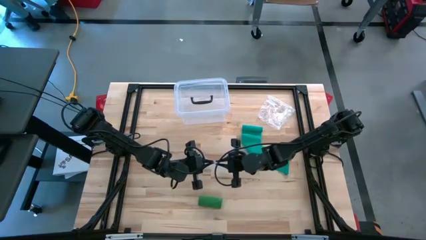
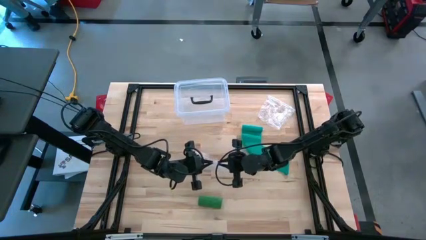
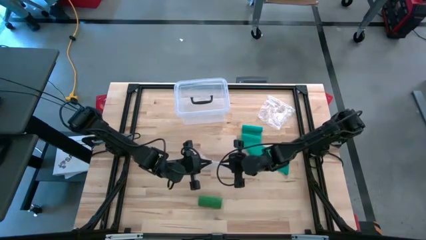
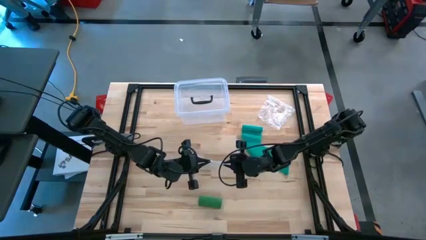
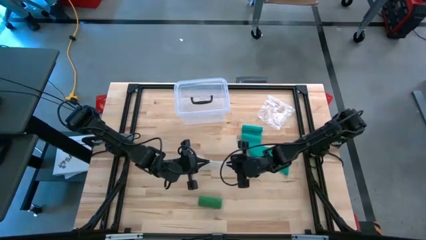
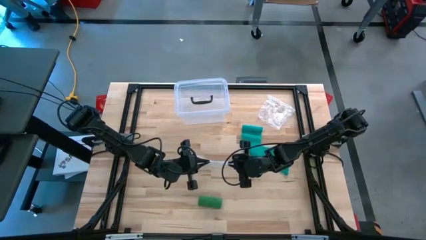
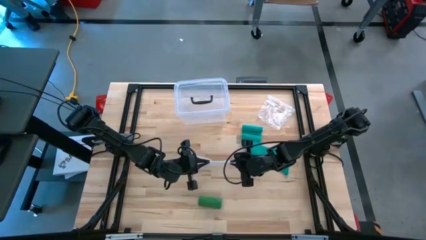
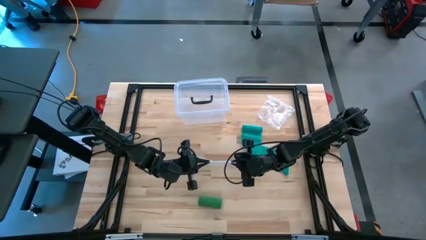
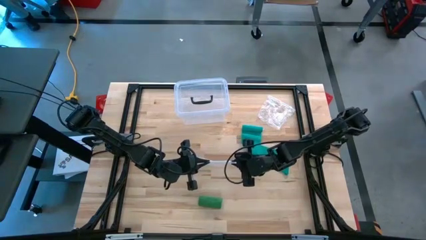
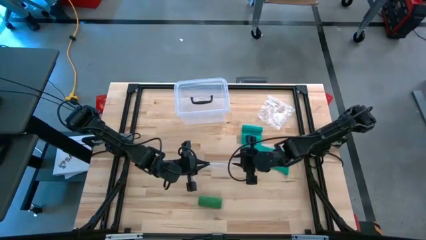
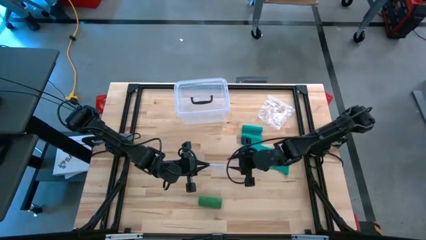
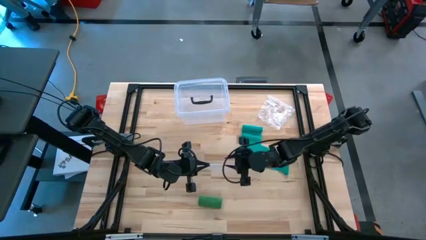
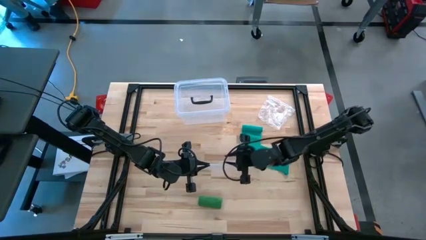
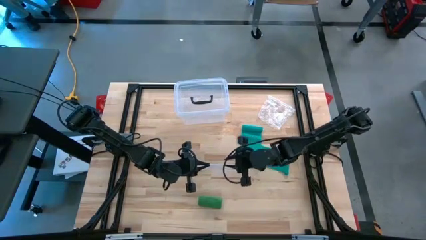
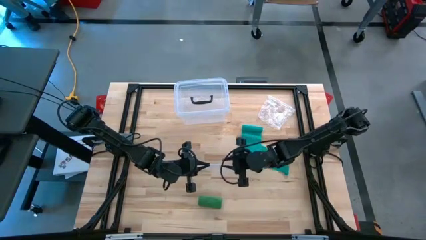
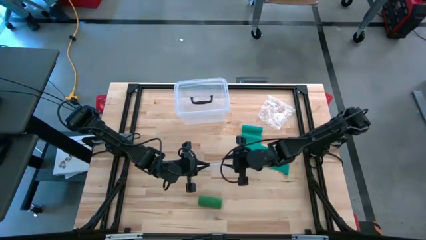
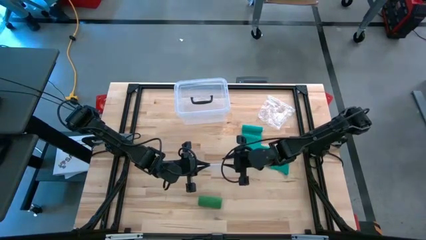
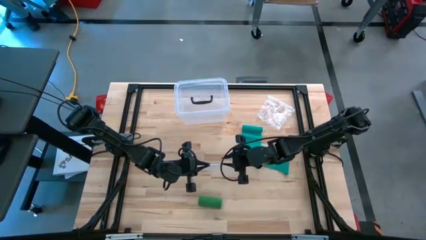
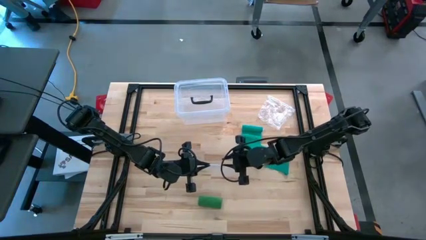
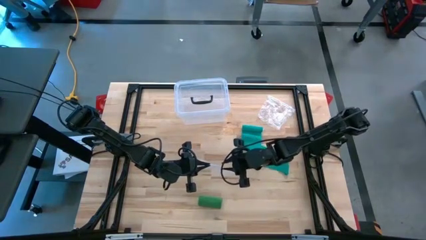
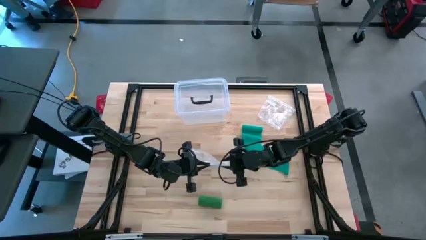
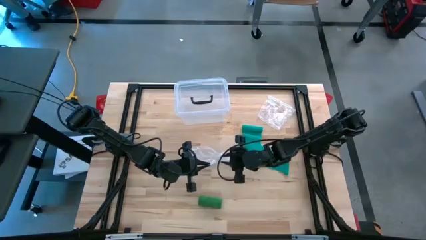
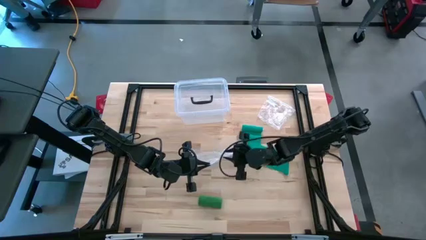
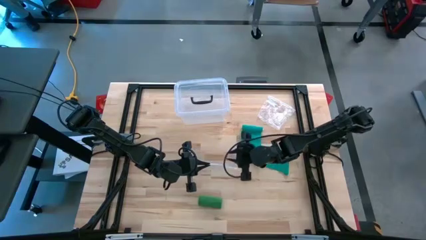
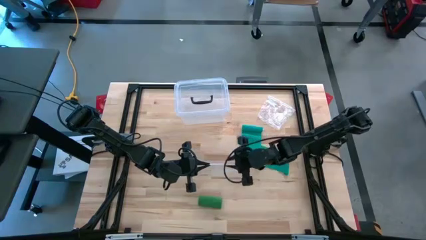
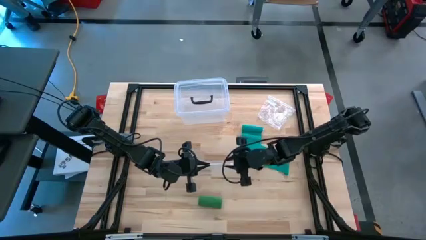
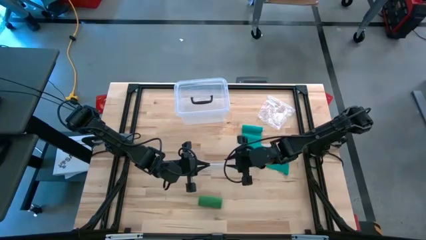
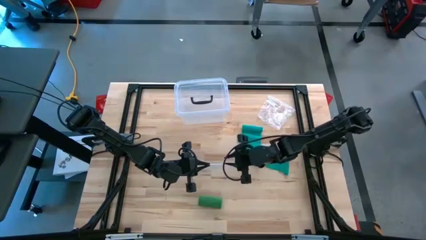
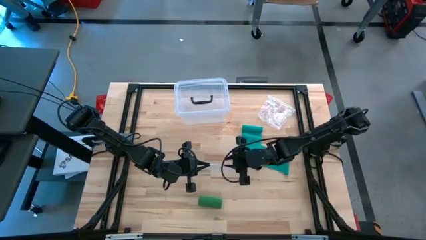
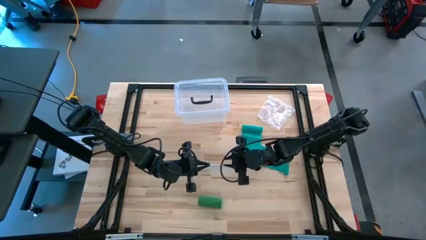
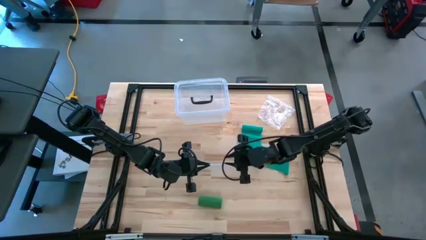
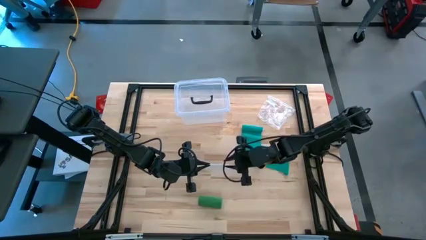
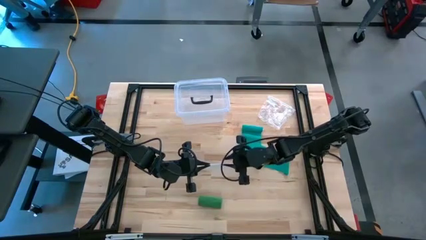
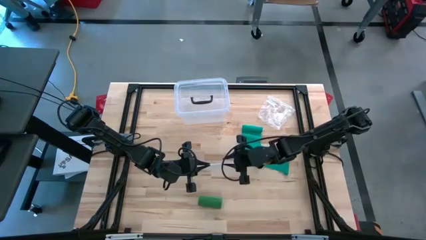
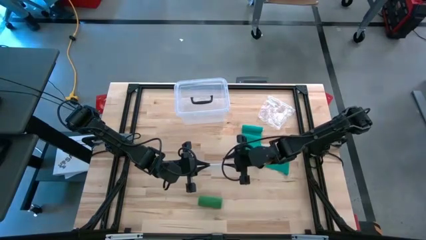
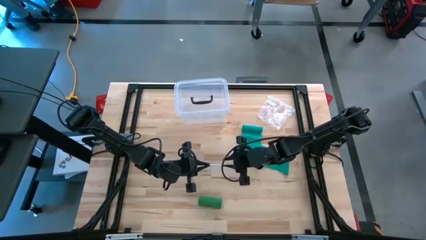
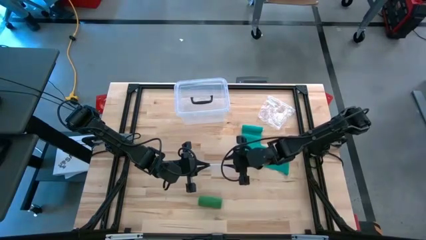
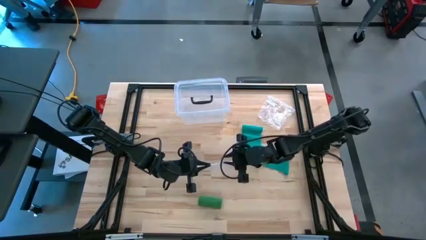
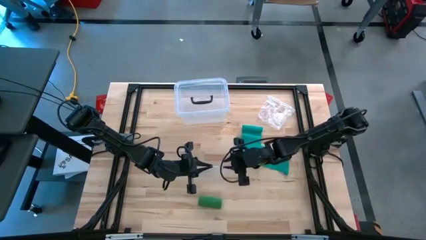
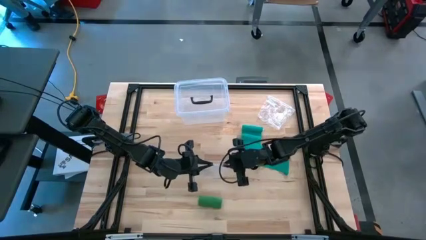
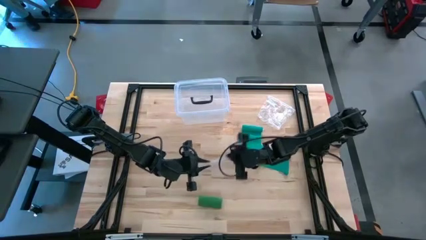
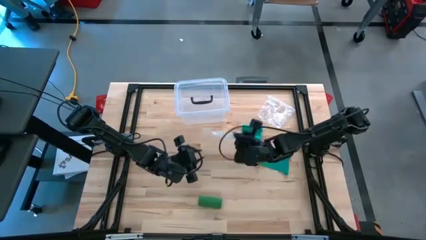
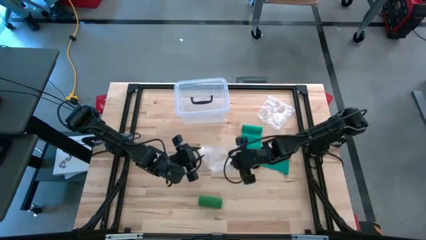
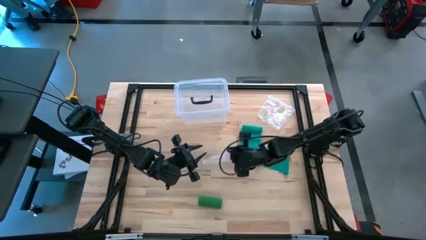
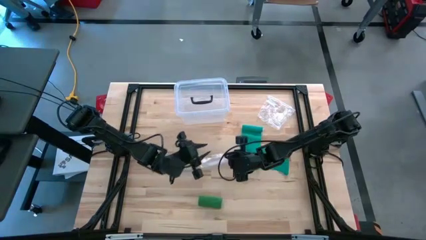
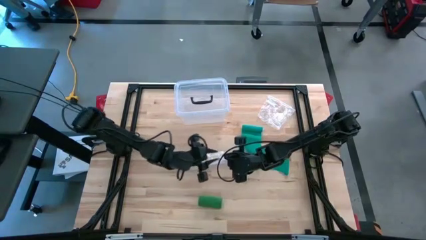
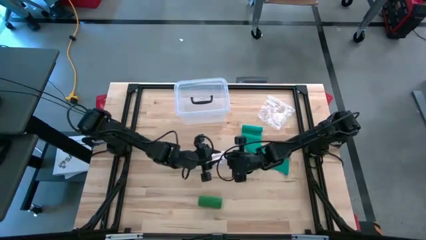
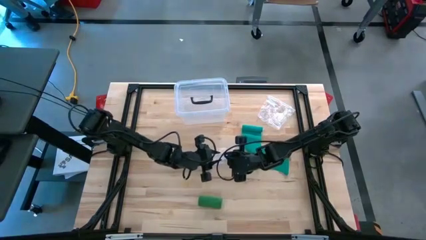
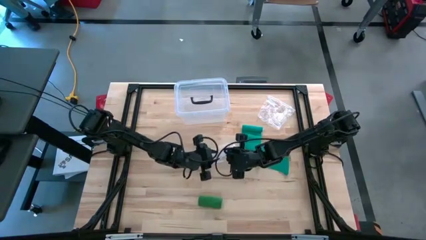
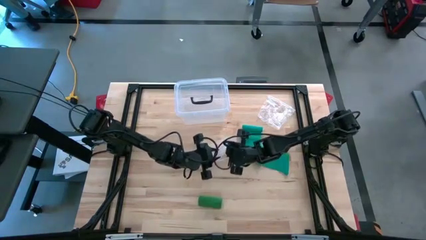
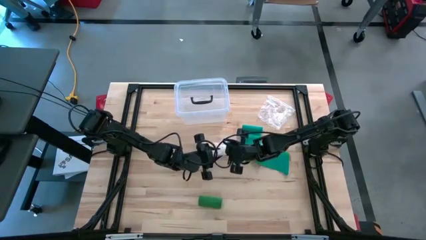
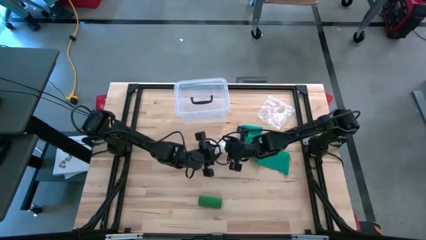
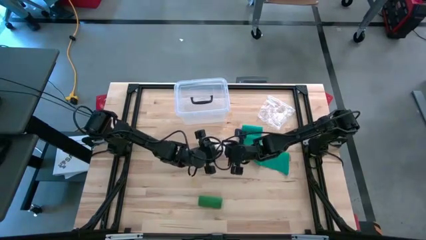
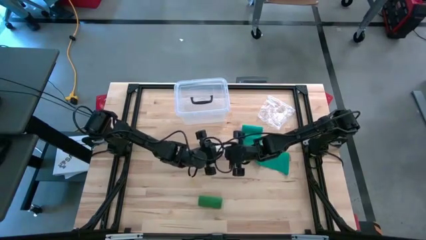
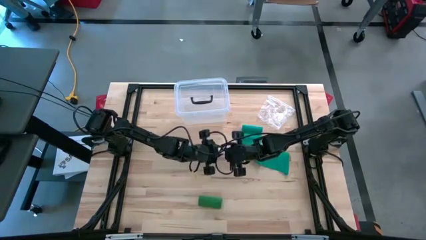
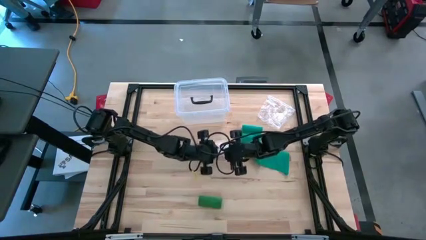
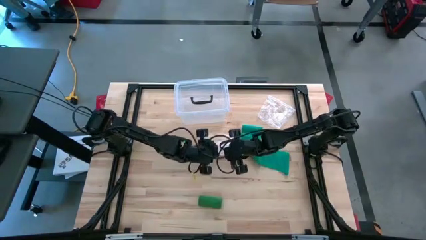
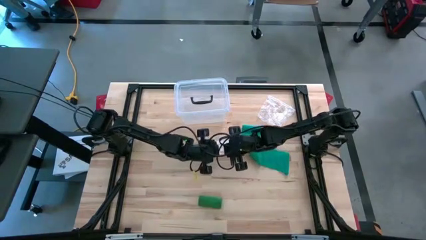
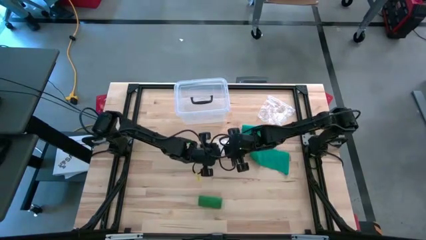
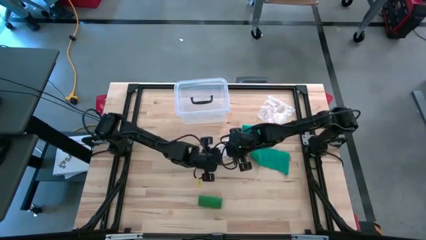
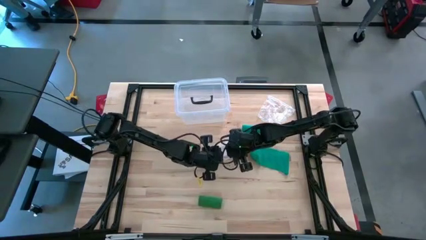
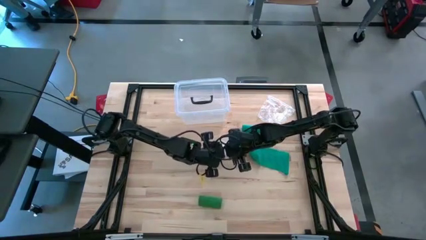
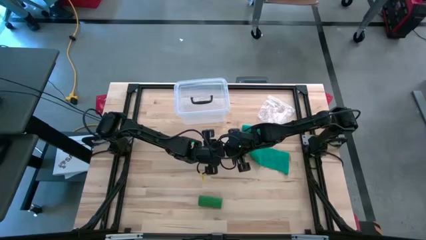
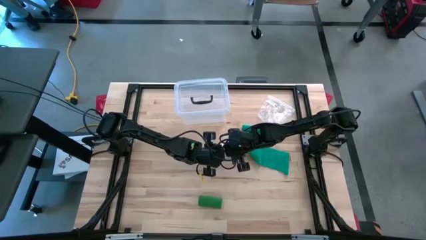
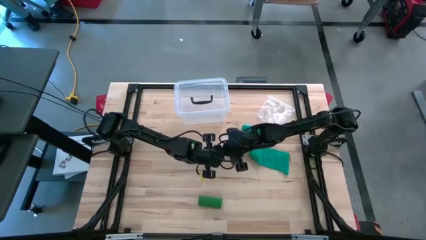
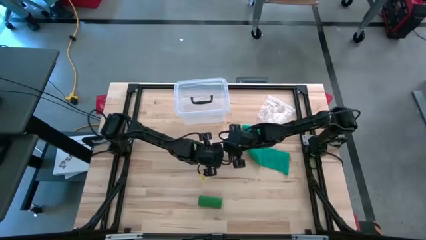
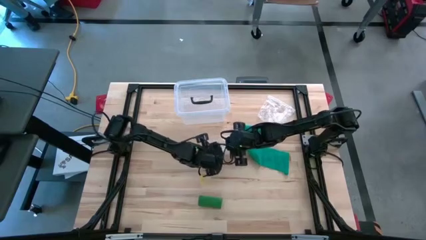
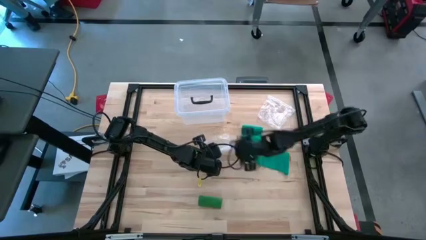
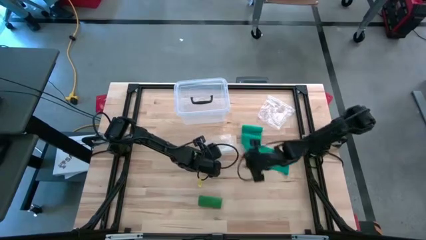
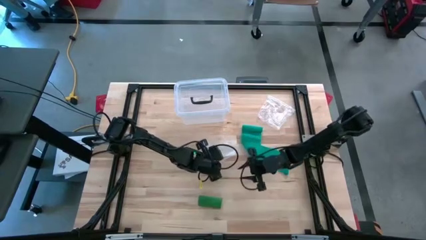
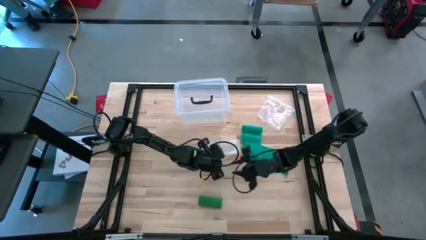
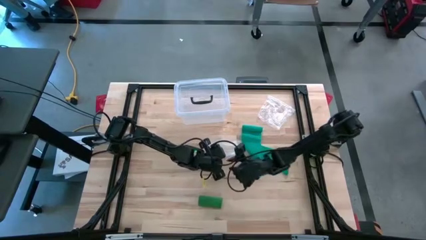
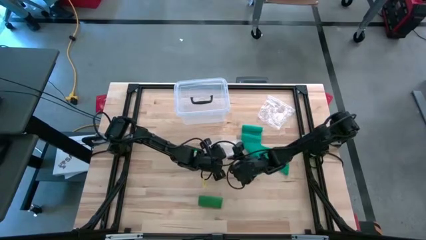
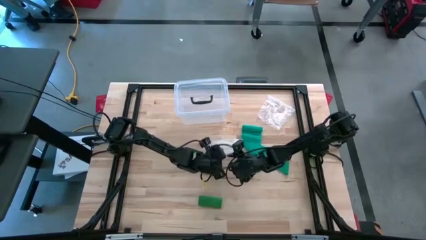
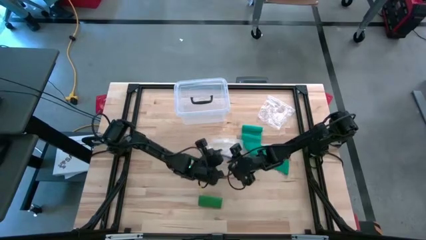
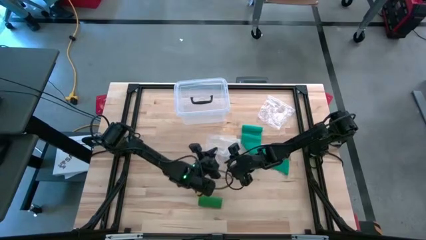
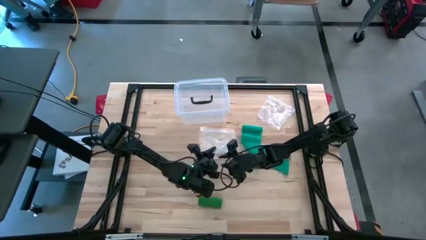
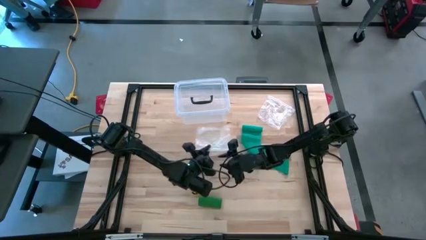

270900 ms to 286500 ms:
Task: Roll bandage
Open the middle left zip bag
